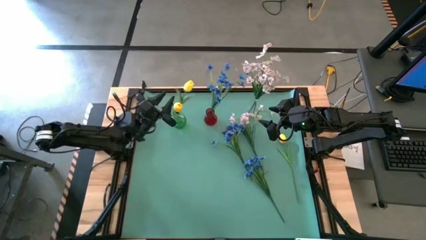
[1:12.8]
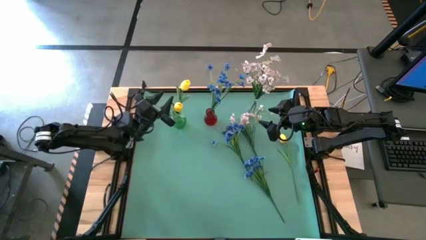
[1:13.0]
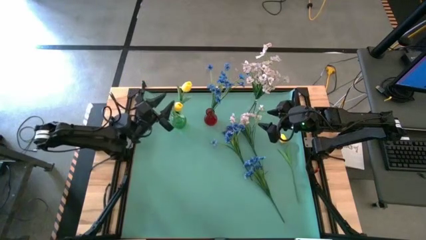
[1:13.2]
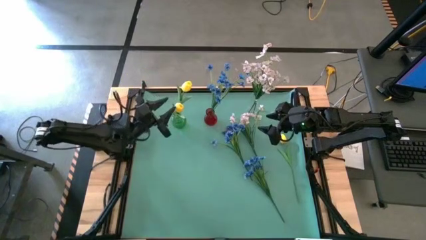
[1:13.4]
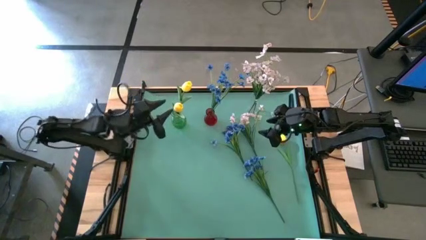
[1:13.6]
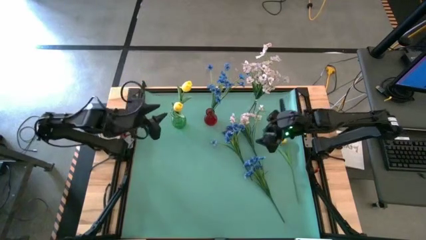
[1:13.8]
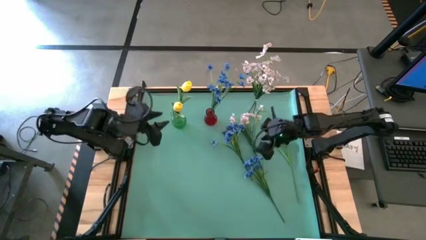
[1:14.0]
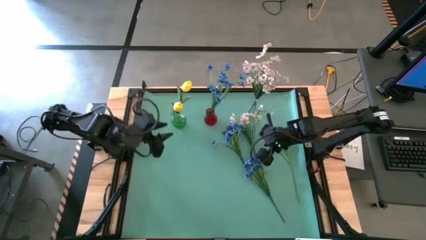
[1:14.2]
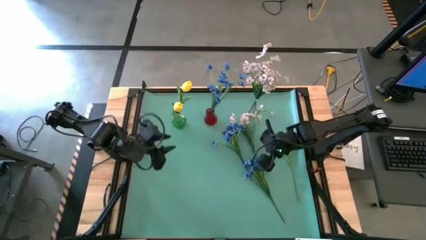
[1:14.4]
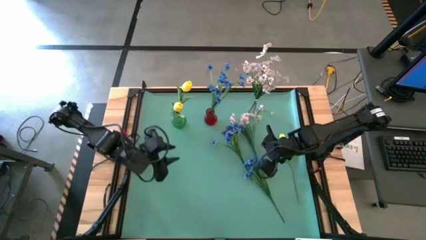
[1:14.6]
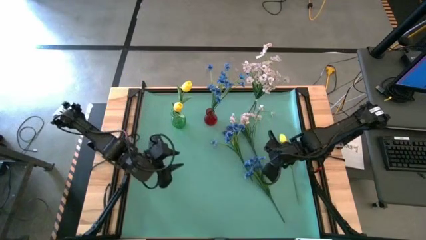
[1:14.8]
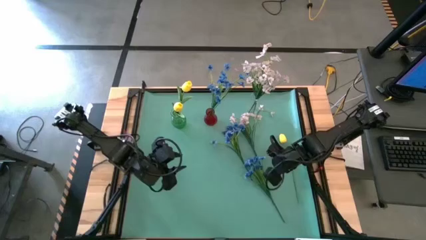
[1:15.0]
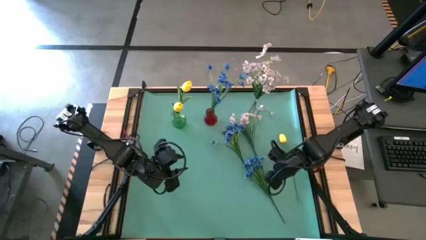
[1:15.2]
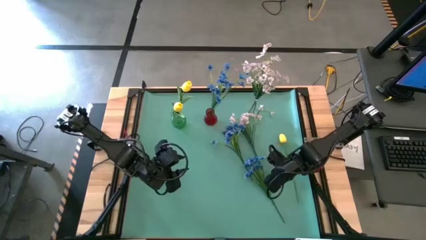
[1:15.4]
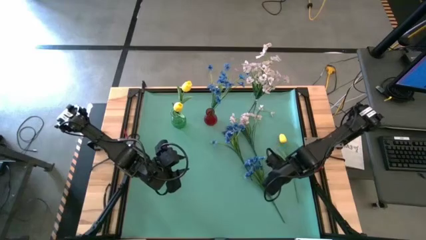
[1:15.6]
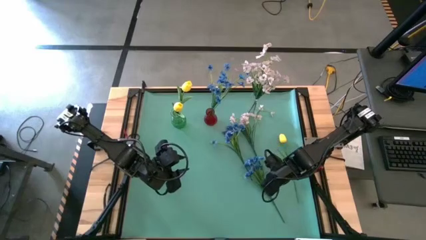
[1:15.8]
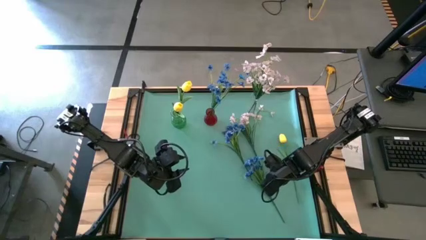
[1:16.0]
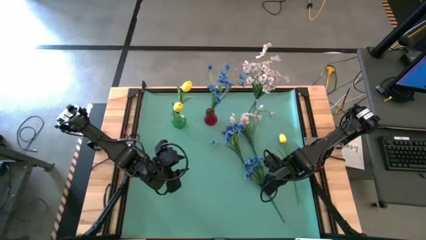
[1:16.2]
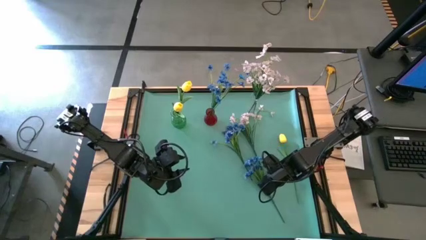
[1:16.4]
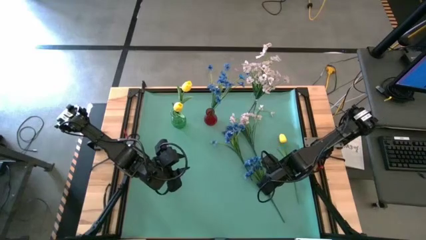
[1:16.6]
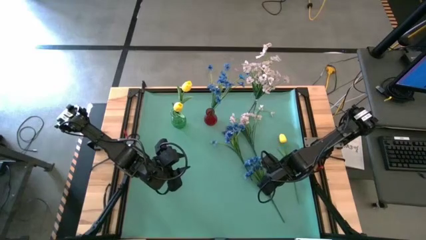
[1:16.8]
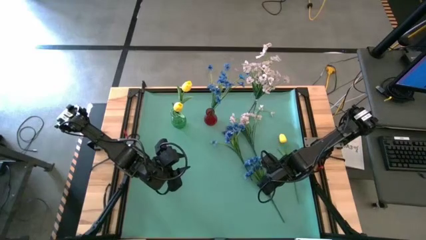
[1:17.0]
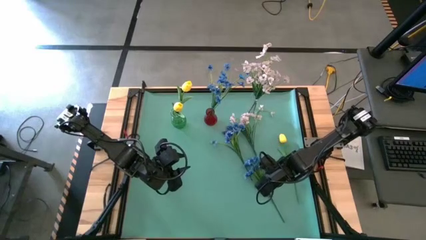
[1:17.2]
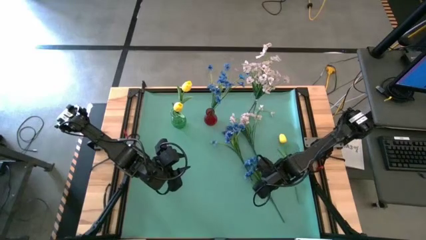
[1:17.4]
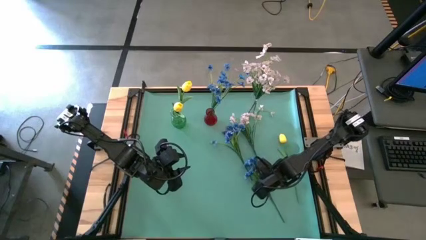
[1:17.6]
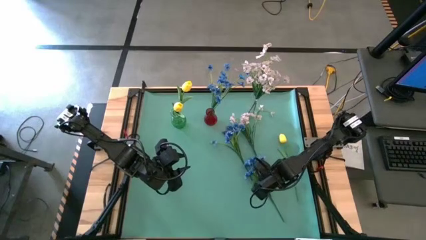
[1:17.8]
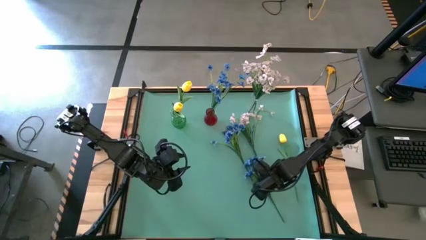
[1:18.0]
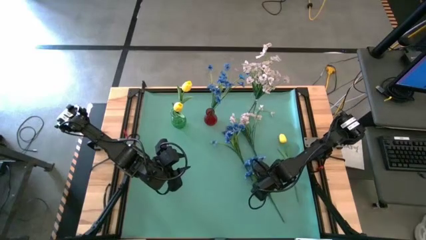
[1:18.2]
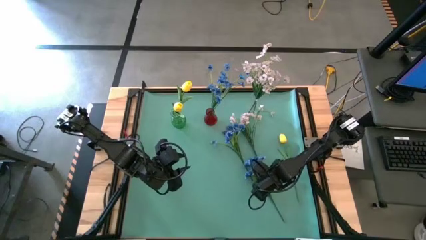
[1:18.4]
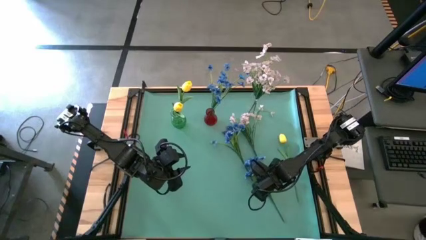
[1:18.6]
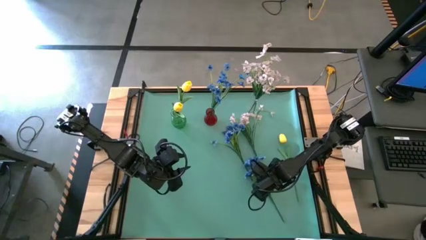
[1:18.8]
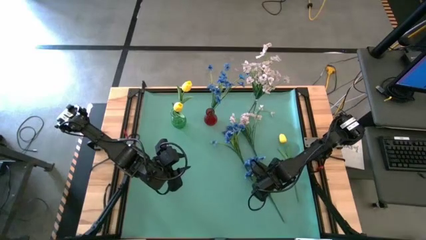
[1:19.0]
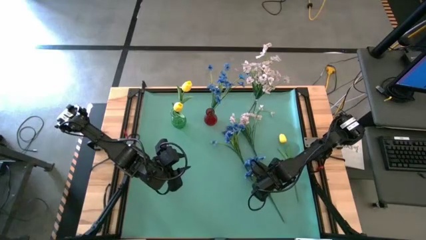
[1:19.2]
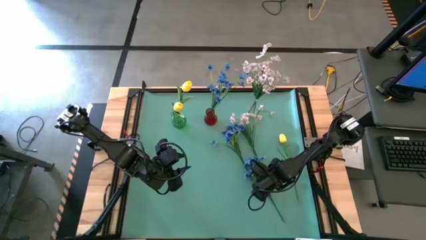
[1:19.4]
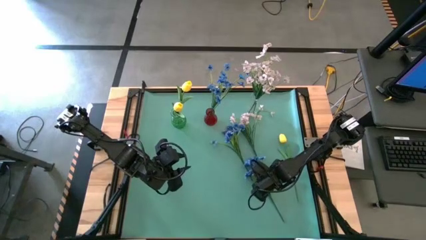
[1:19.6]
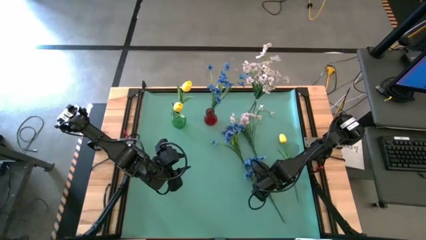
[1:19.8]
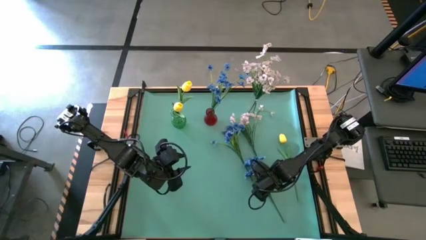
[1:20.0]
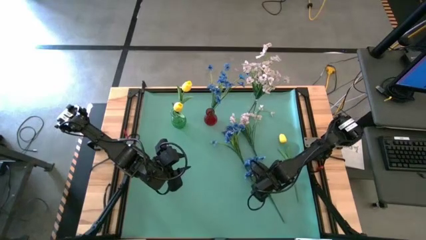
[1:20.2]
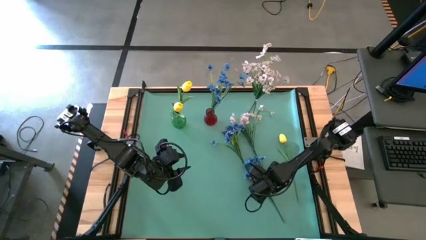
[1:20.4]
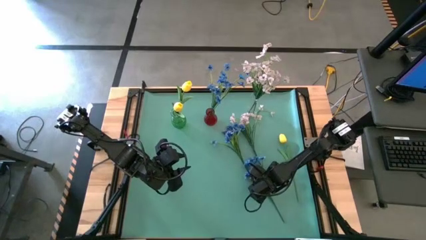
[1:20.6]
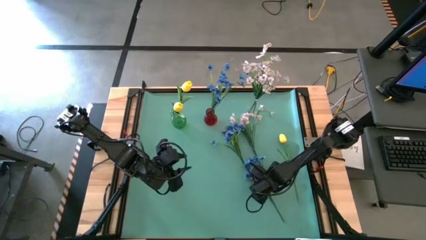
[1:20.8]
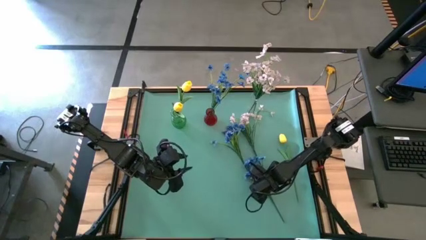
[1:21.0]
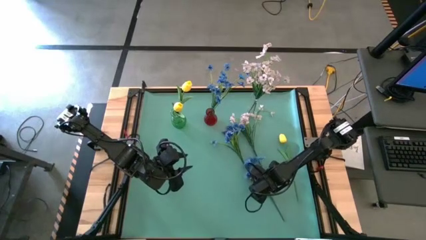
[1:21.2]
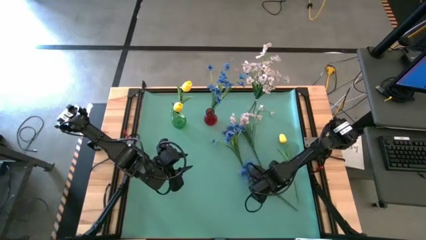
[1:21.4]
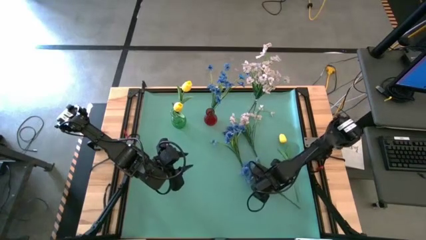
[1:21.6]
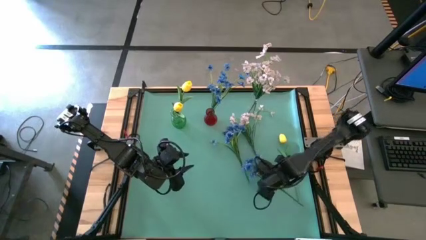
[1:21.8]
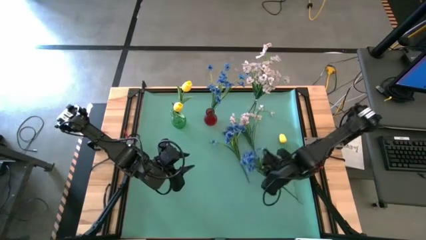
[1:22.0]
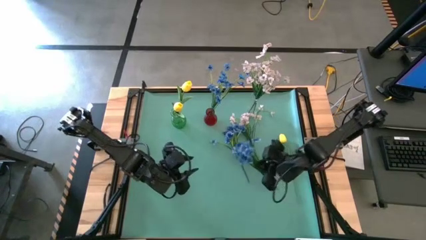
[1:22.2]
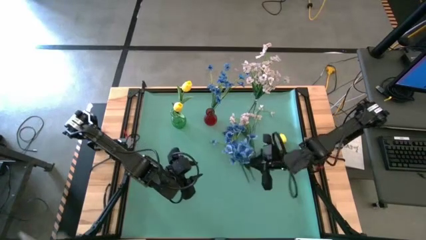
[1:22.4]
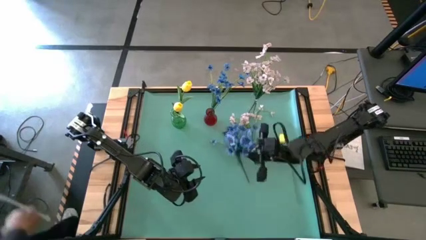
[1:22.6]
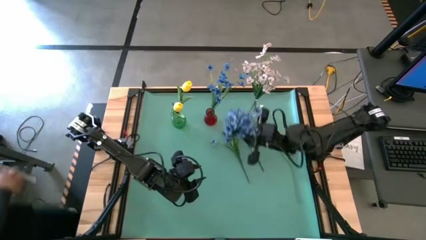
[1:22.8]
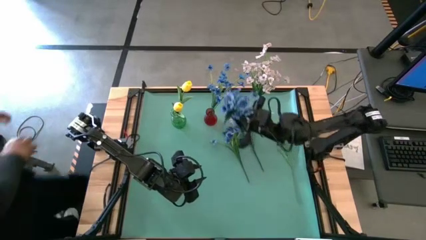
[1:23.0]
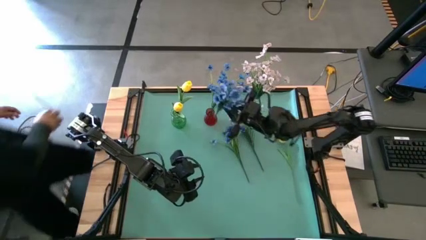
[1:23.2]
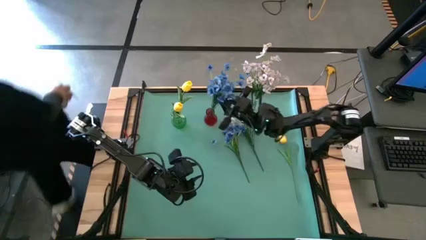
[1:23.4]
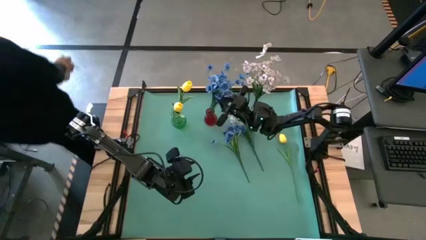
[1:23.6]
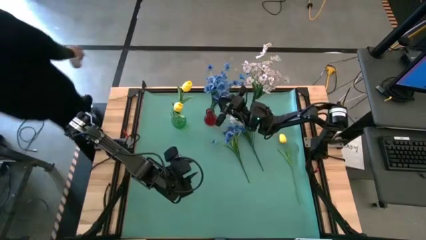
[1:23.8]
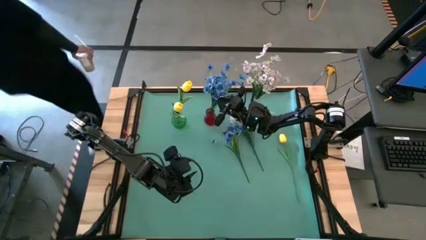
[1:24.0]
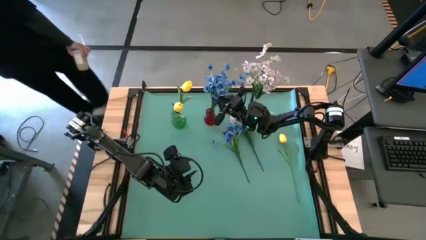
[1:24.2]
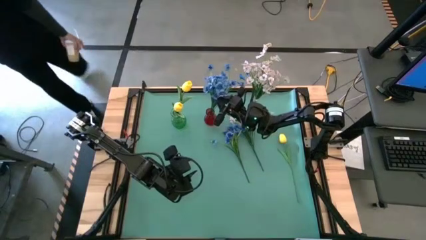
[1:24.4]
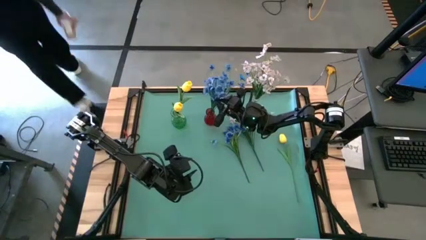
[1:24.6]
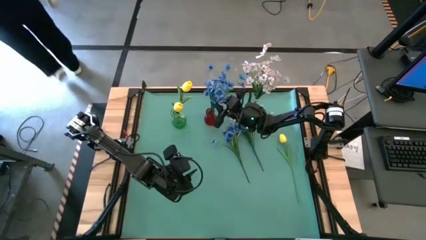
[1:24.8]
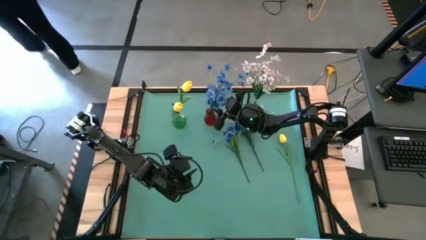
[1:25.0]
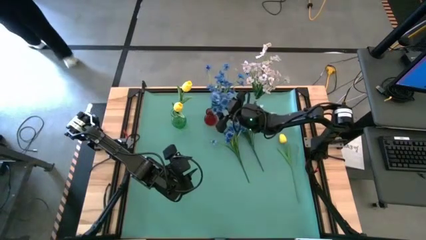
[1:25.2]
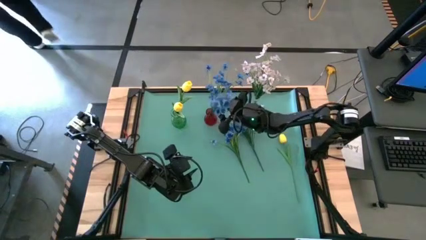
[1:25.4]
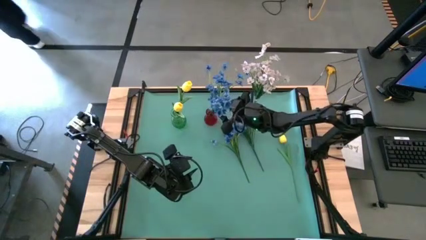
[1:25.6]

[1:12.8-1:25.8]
Task: Sort flowers into vase by color
Put the bottom blue flower into the red vase

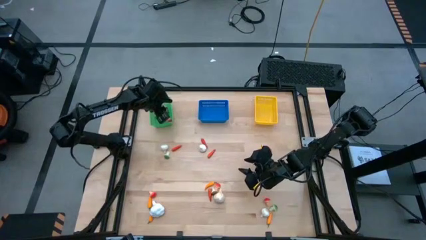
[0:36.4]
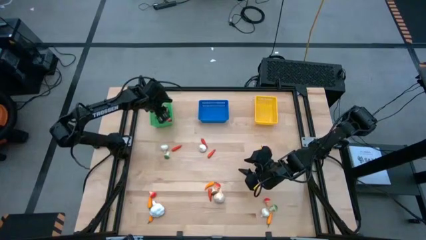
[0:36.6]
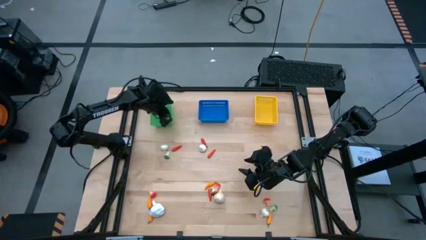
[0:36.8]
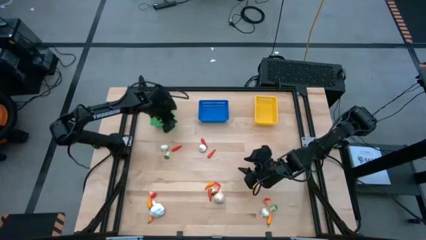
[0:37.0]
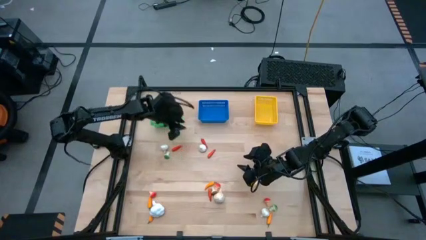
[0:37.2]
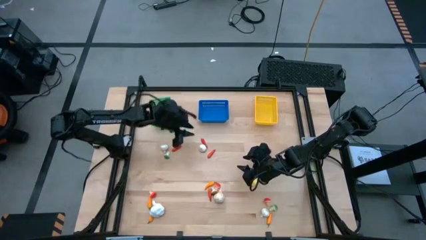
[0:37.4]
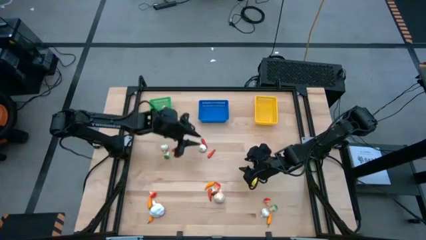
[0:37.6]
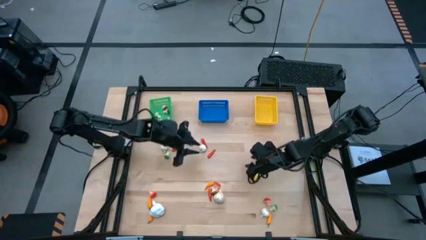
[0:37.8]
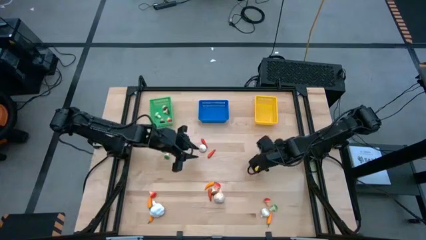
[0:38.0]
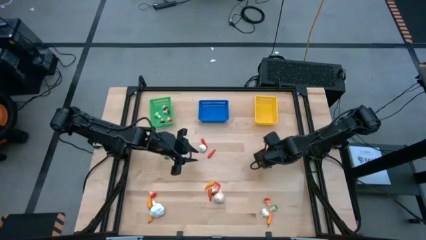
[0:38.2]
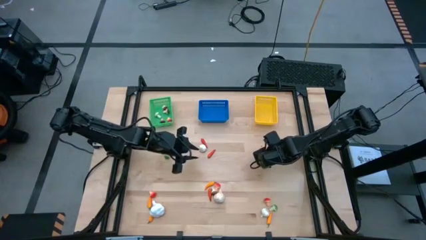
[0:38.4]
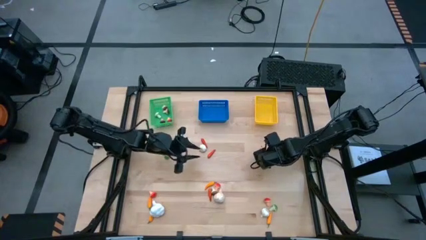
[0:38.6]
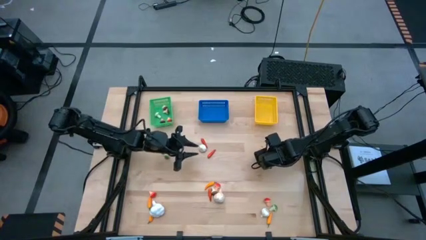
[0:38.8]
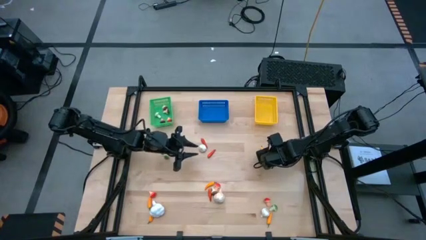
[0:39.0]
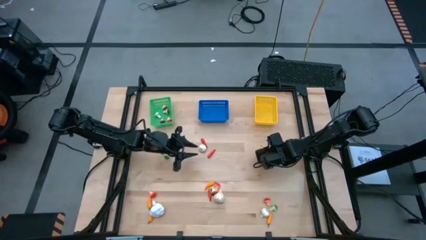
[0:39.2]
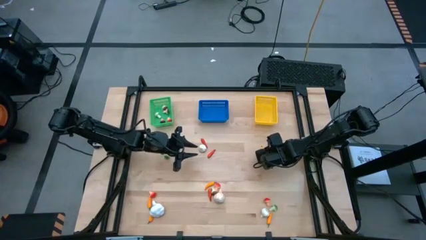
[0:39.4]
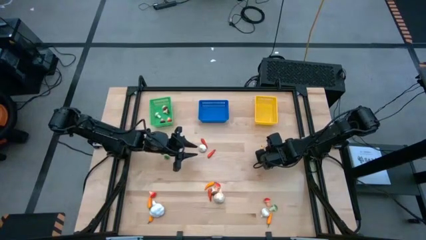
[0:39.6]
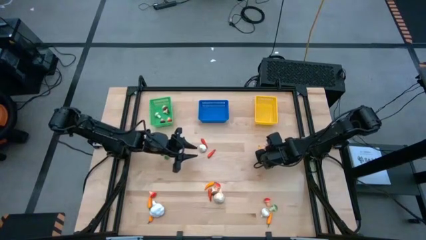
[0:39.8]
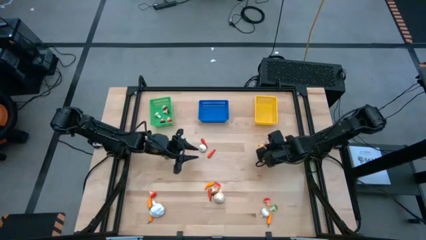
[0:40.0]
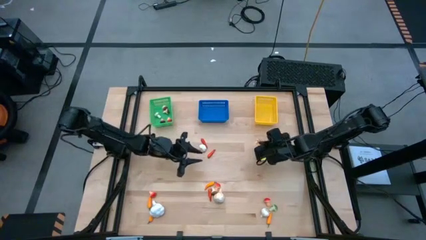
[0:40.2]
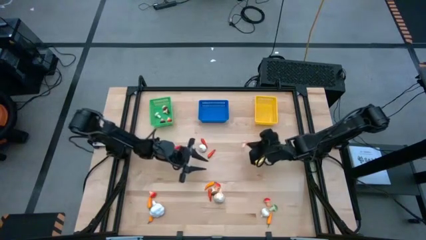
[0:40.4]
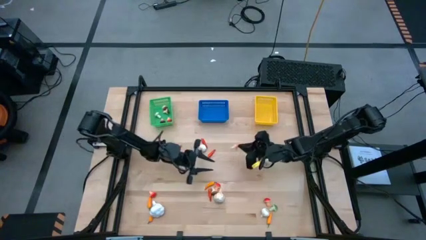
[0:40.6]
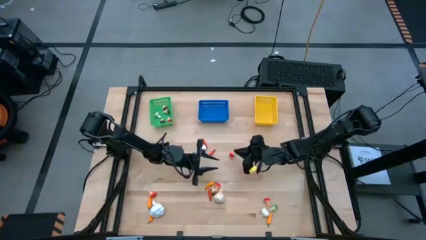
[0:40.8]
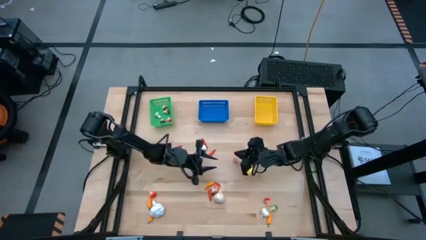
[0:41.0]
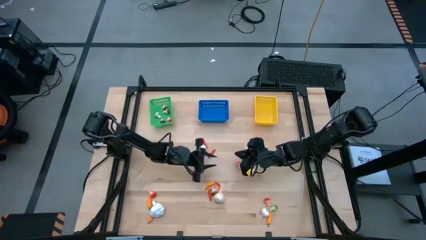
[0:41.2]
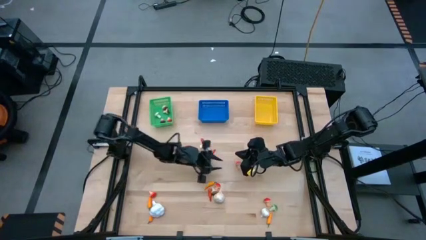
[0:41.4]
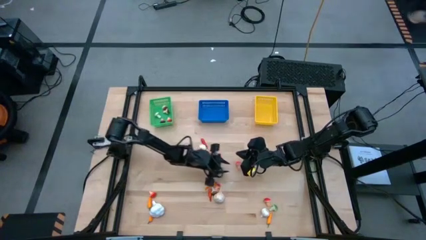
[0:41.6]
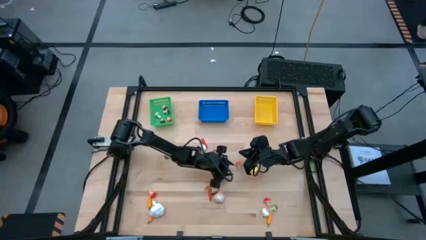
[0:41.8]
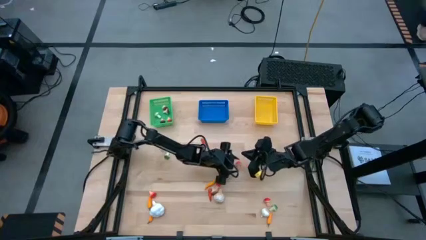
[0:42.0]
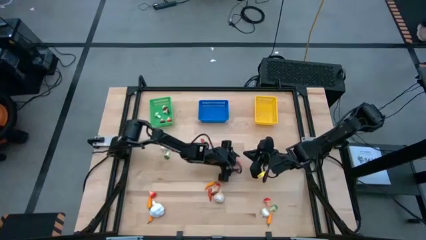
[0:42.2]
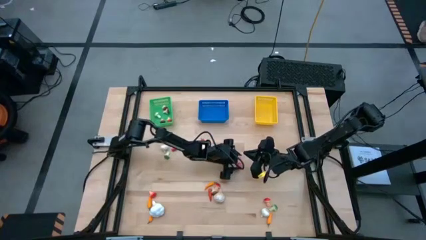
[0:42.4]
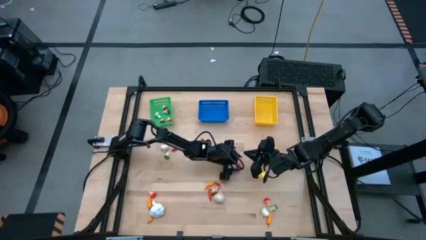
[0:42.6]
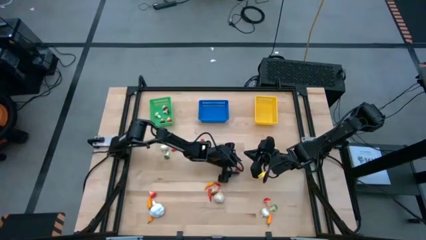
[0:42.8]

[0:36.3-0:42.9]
Task: Sort produce into baskets
Put the orange mushroom into the green bin
